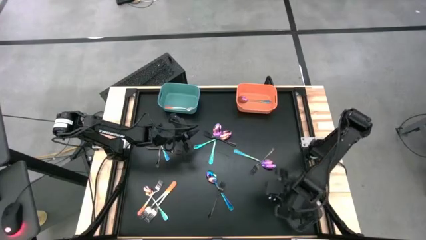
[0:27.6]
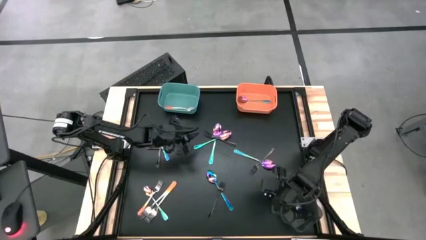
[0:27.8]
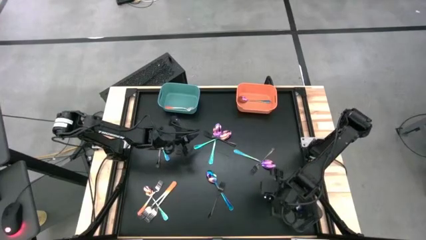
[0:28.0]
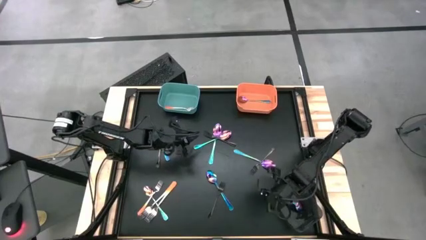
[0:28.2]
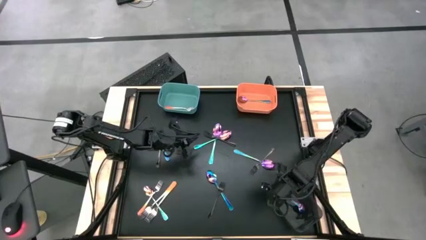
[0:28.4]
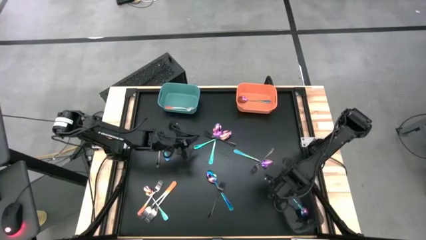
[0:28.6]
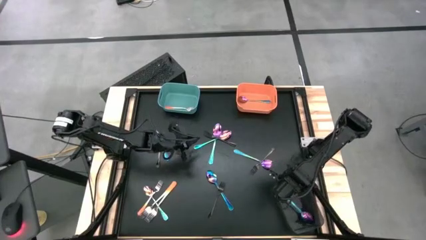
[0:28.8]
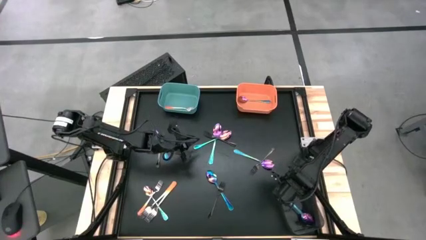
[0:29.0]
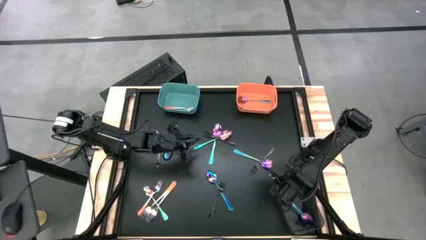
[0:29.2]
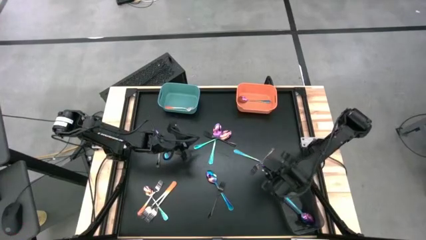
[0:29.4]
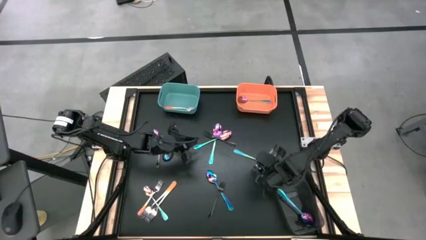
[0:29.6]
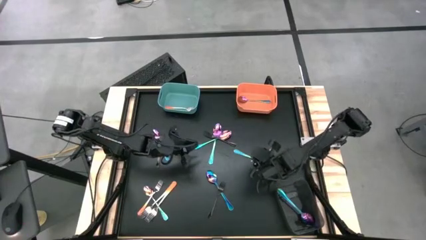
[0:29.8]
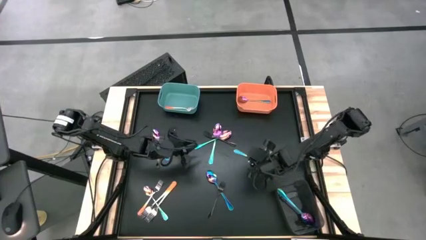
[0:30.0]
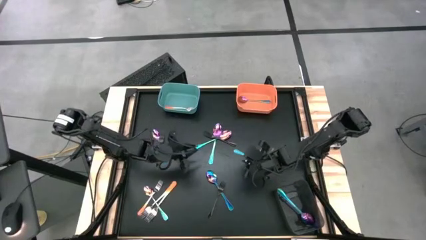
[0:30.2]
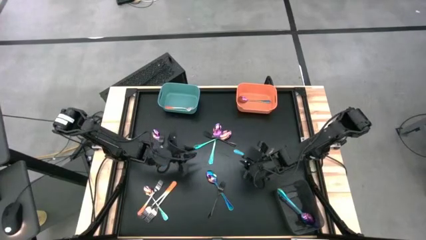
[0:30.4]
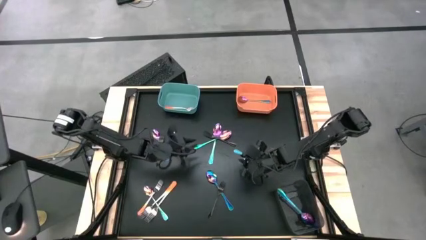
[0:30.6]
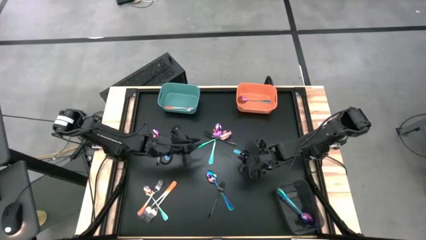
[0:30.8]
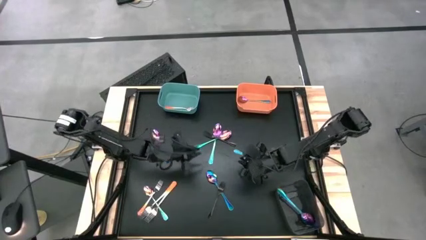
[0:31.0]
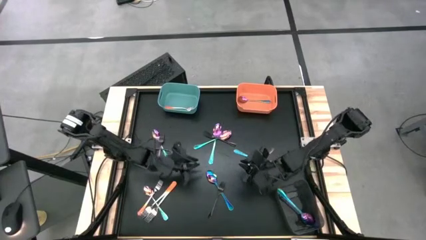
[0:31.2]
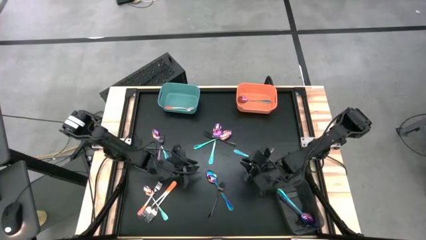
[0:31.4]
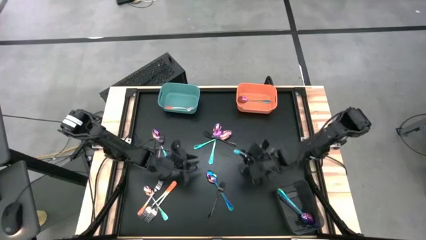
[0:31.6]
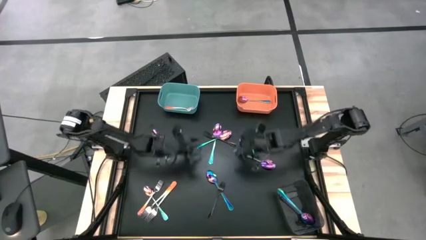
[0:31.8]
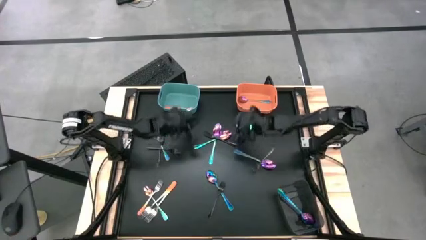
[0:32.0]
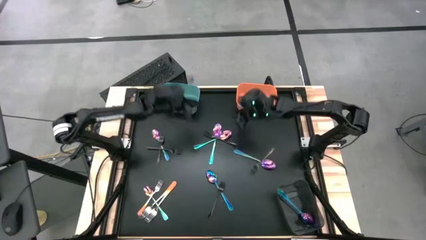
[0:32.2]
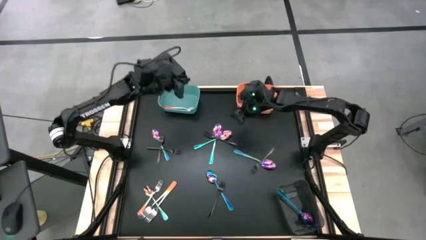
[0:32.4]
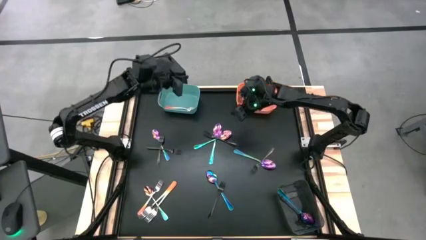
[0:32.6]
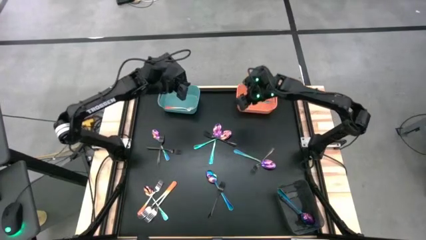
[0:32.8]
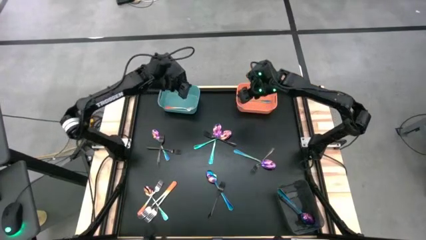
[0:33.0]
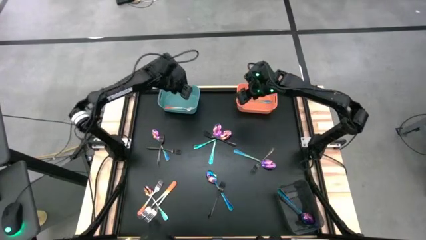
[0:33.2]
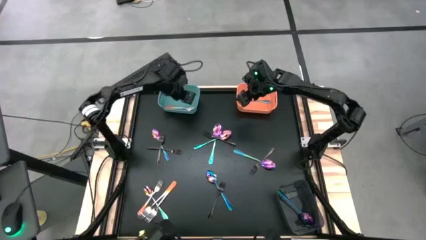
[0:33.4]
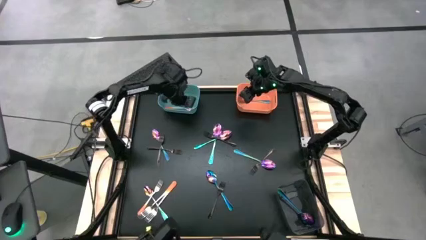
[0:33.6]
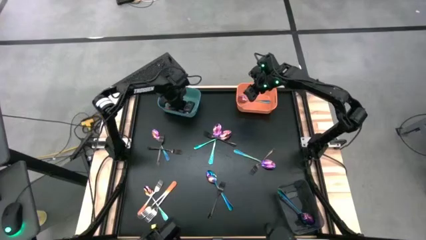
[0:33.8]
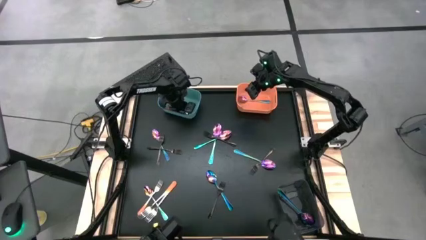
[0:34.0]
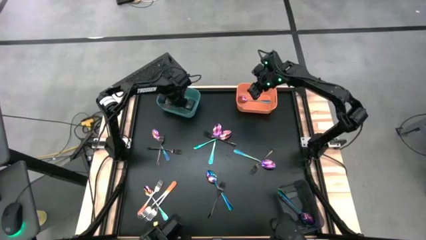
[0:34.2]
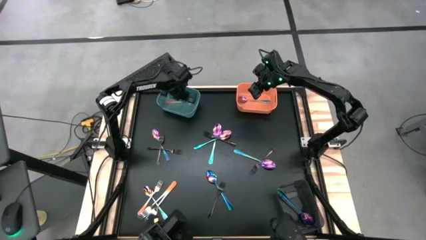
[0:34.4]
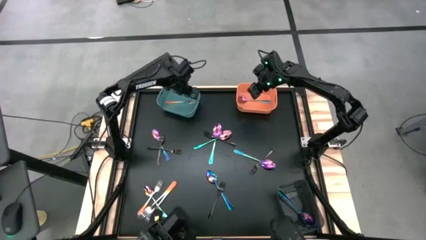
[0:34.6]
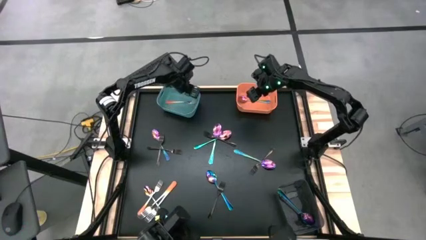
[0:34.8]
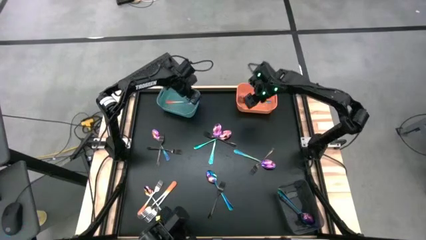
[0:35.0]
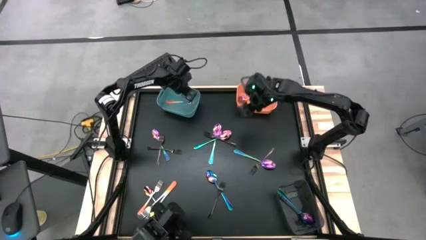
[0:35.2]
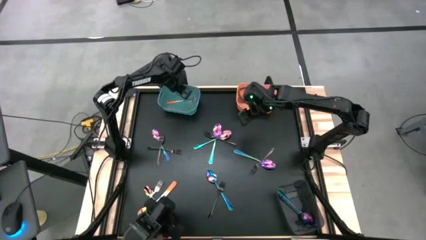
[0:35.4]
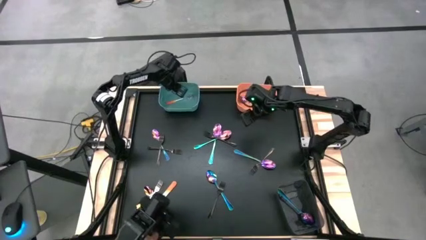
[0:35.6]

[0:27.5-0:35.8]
Task: Sort silverware by color (type)
Adjust the orange fork in the green bin

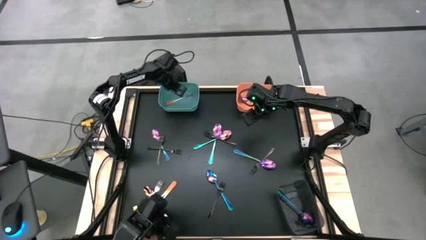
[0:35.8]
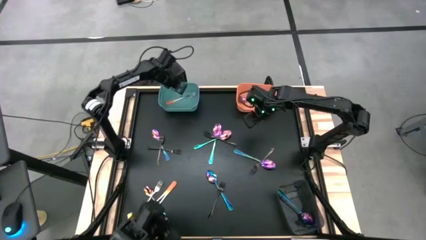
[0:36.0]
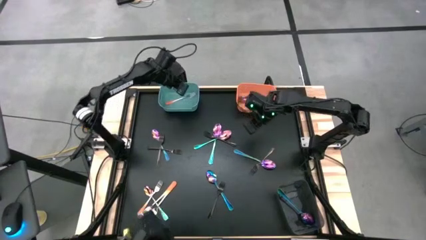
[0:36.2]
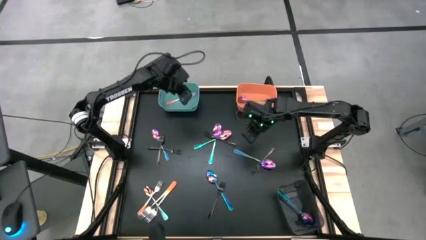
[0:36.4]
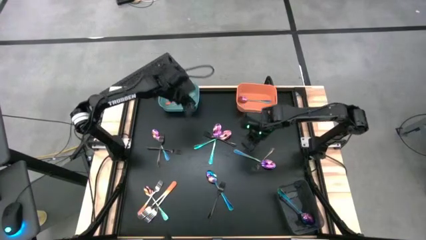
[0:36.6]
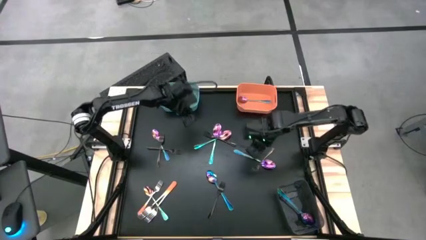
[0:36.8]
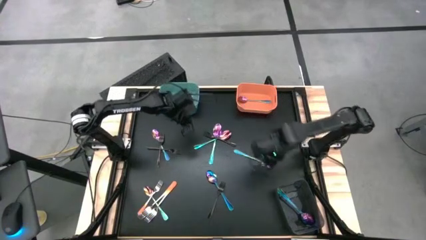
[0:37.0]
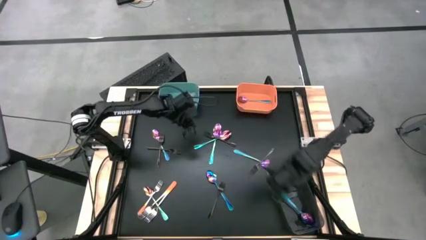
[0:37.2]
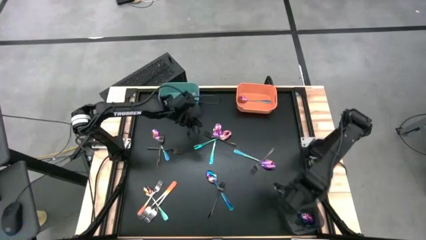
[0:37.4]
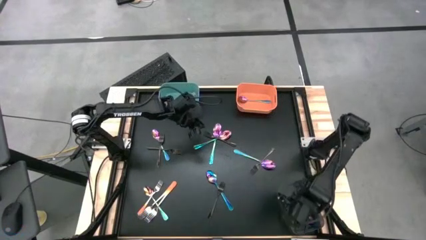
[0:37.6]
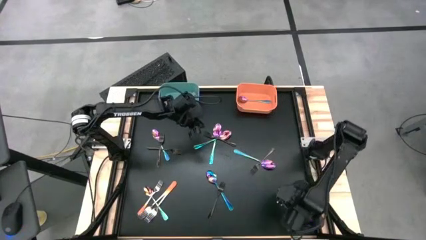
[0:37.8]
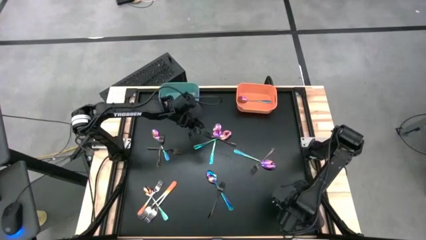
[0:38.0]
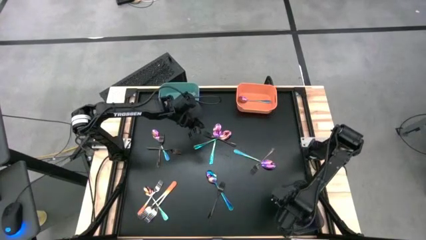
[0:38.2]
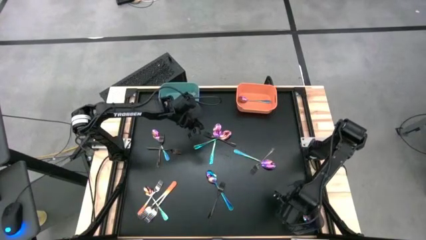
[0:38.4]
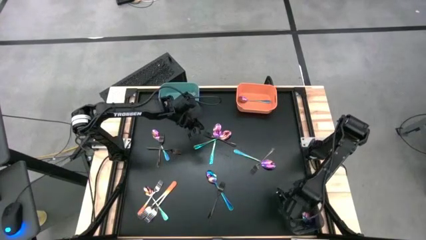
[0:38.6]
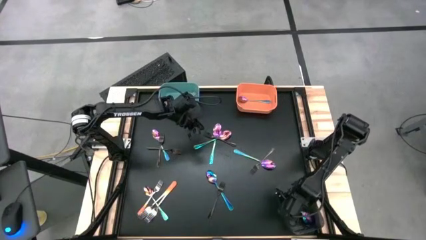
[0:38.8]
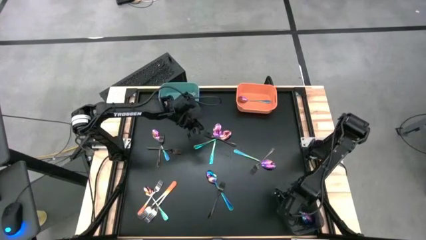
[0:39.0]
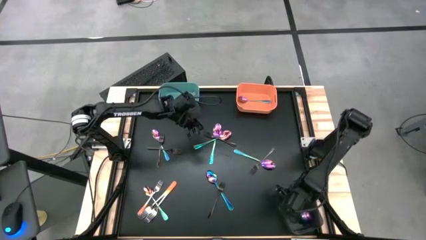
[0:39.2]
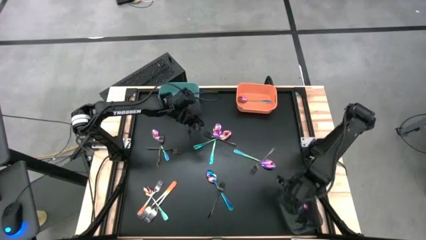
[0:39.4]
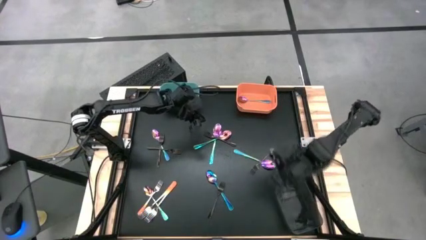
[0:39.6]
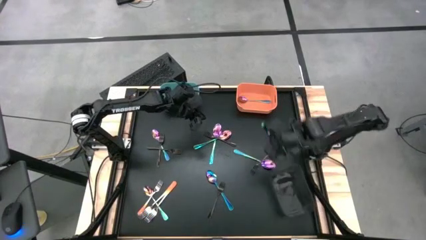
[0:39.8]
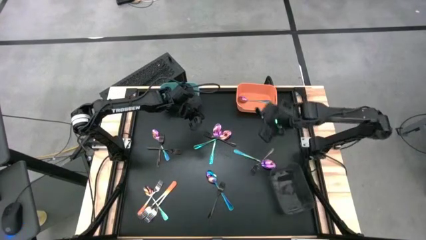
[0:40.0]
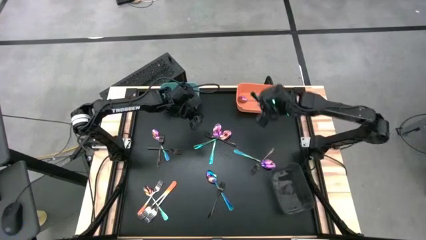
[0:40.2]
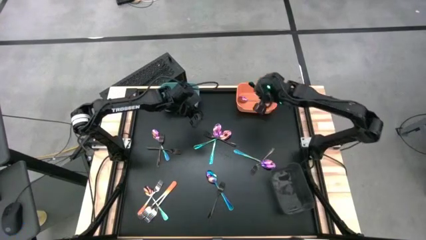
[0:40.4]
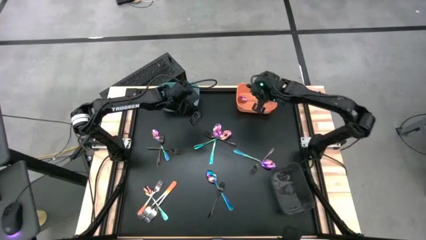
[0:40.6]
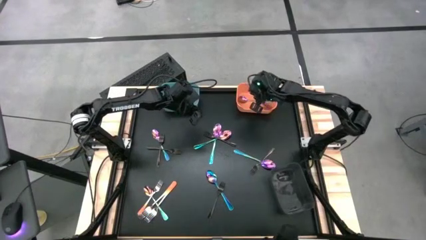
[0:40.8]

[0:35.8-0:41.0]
Put the purple spoon from the black bin into the orange bin

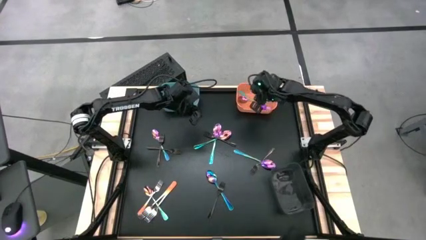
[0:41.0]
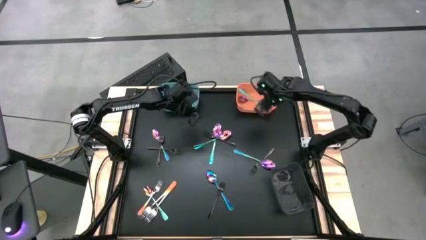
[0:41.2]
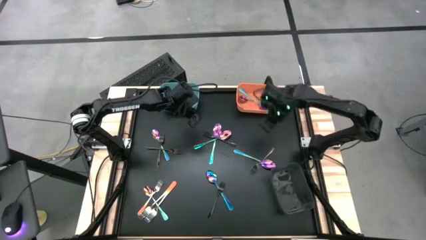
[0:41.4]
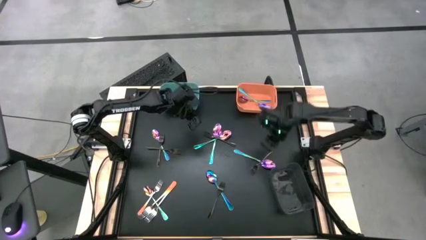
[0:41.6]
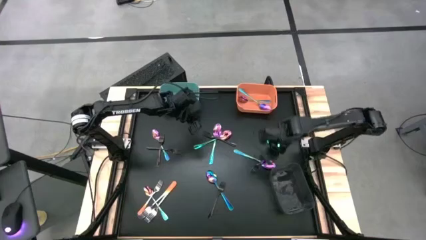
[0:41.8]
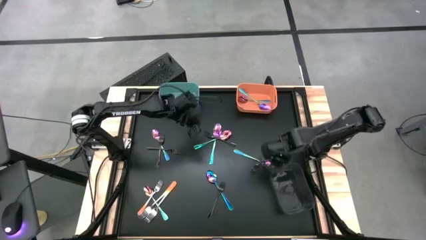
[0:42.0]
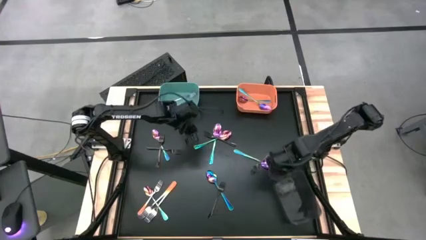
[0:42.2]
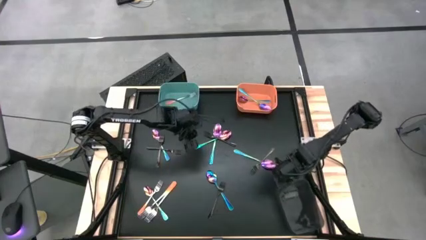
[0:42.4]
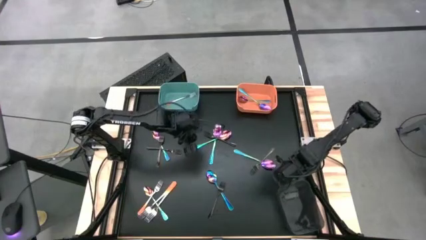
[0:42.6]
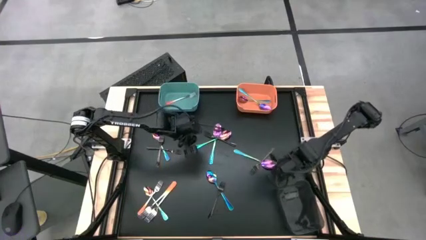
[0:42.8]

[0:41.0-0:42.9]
Adjust the black bin

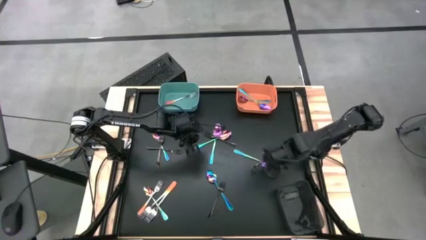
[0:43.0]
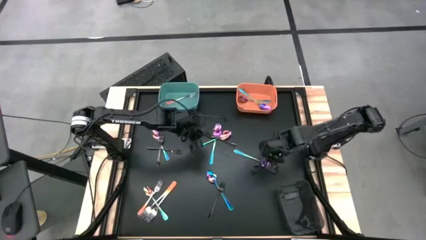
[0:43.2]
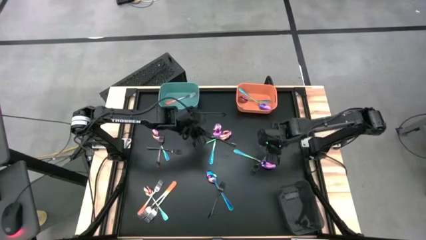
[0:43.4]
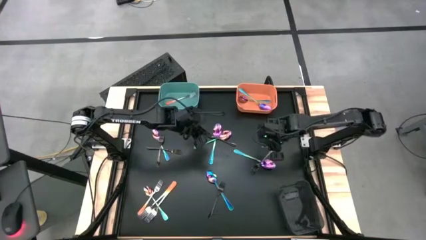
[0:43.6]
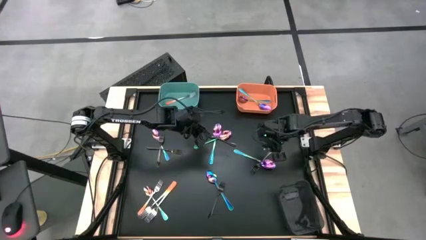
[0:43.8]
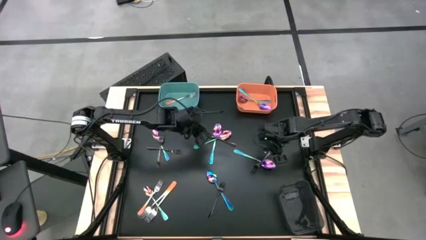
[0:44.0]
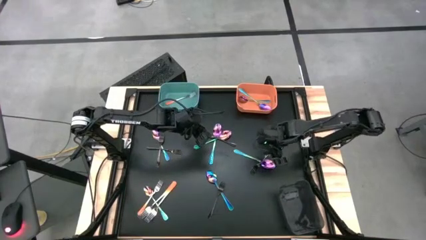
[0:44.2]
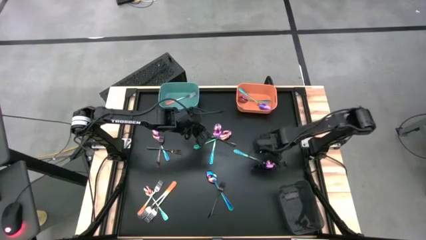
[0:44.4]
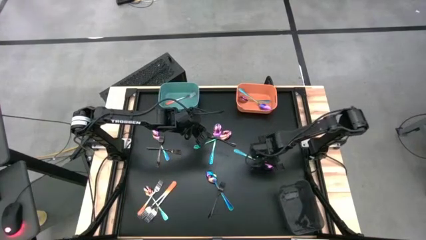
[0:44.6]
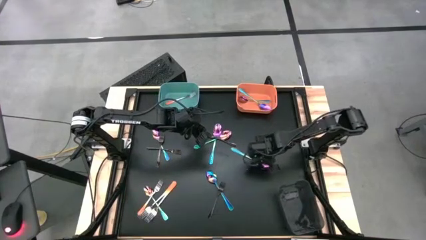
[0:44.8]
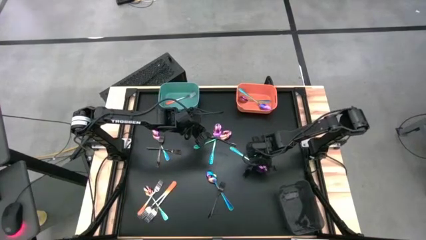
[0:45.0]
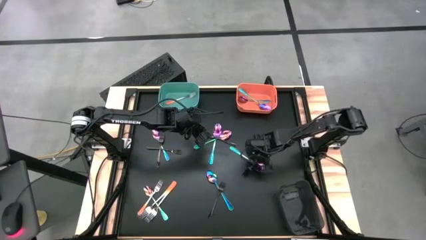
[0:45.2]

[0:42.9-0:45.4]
Put the black fork into the black bin
